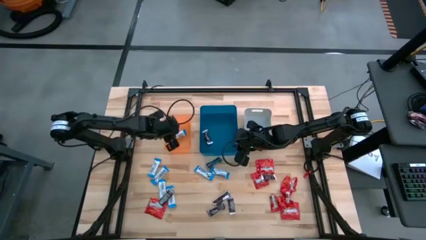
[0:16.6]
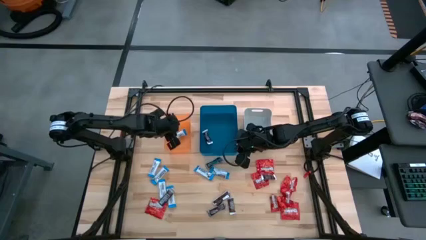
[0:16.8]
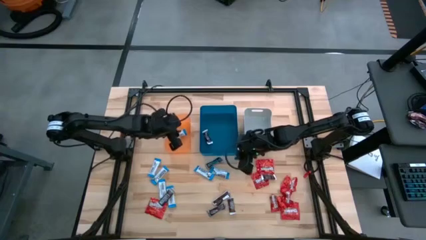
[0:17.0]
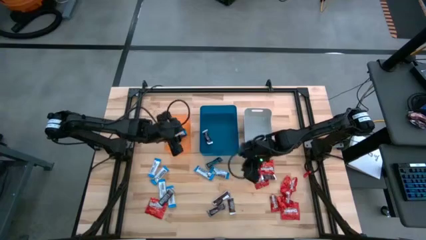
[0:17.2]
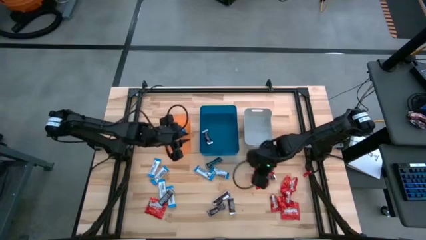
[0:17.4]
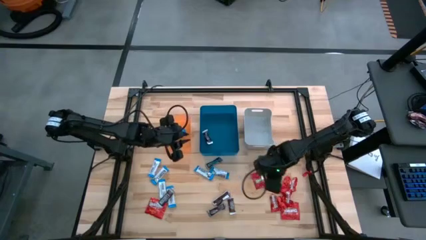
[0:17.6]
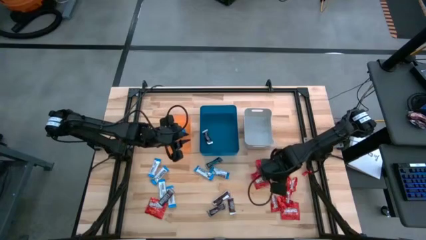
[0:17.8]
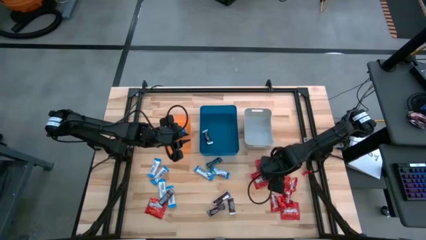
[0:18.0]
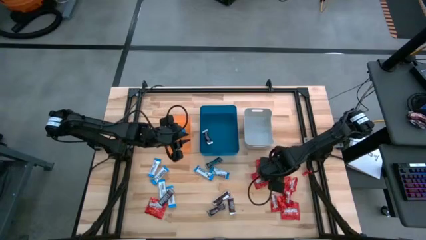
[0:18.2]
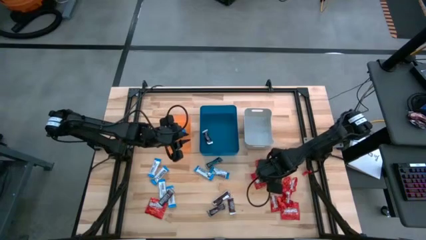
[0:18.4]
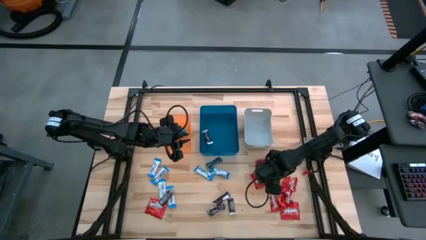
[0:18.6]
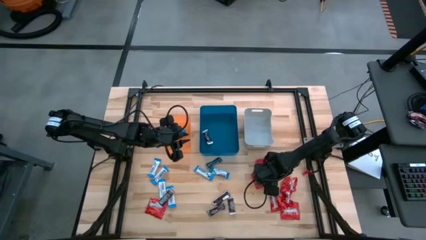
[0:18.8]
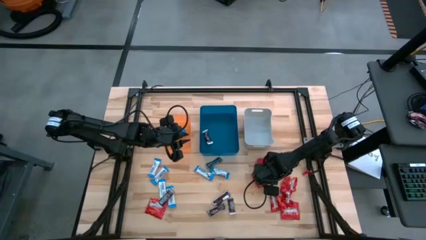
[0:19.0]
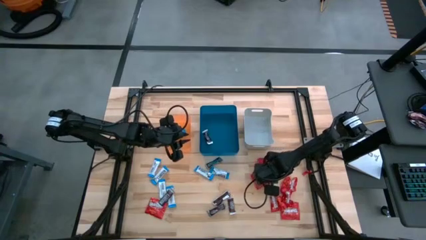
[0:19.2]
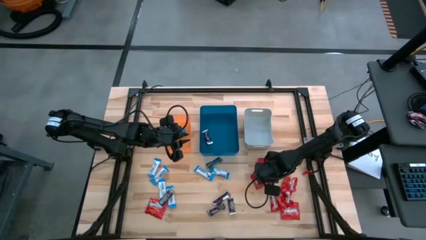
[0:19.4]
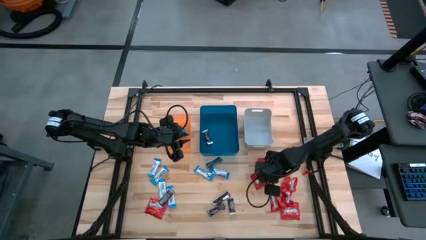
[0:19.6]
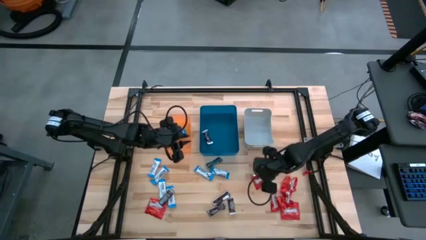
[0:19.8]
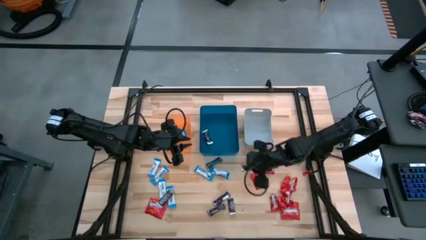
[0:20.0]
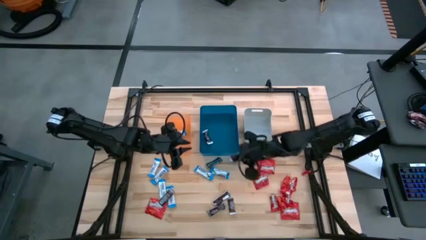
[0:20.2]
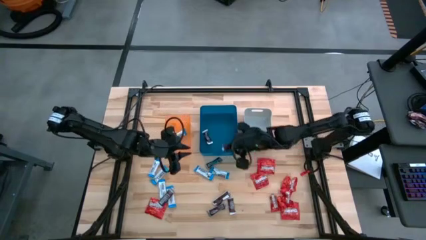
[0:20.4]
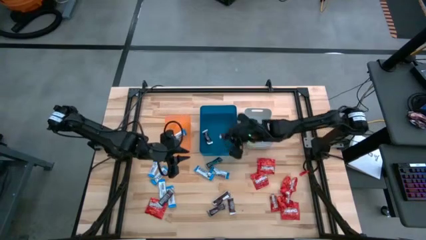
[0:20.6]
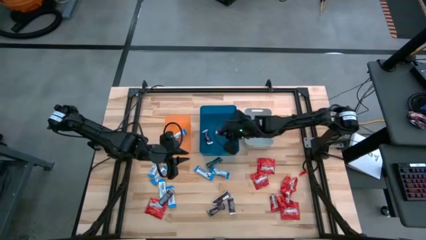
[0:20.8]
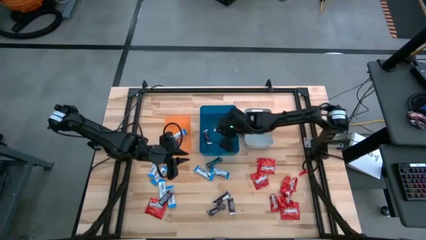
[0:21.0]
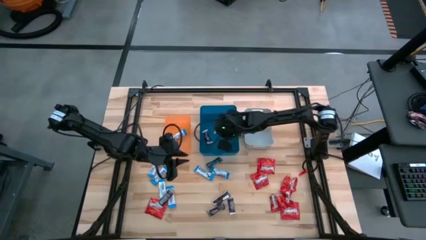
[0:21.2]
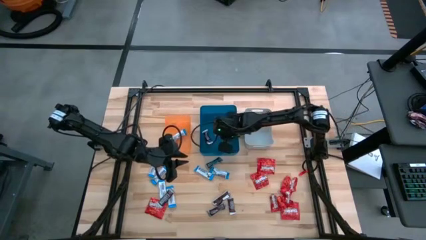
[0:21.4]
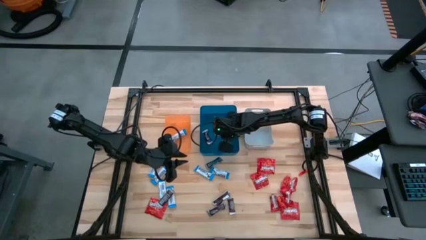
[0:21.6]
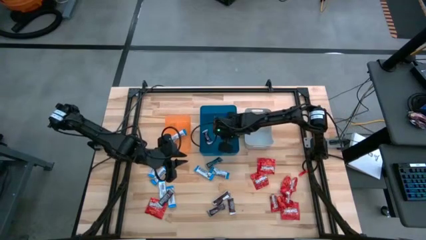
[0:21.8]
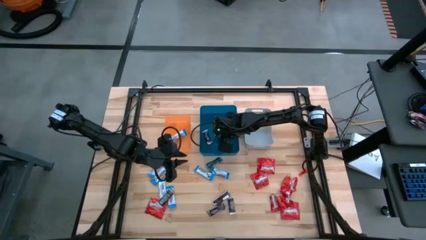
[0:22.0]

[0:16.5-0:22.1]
Task: Sort candy
Put the brown chocolate bar into the blue bin

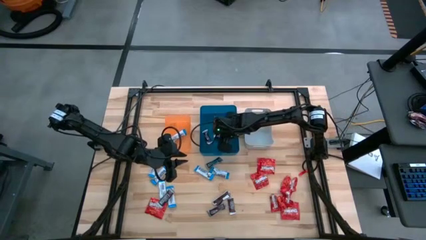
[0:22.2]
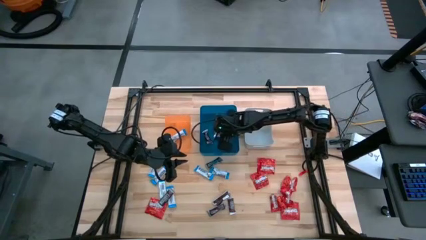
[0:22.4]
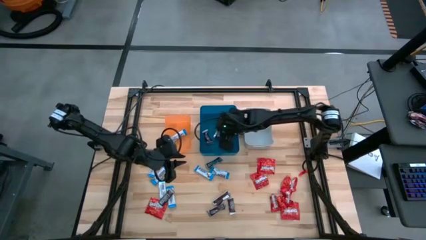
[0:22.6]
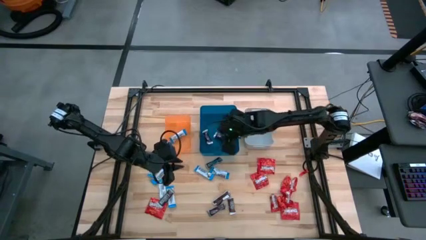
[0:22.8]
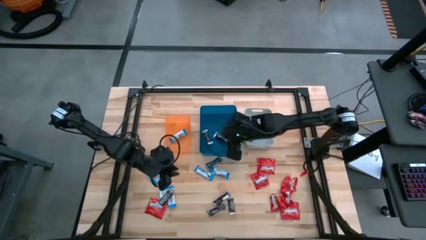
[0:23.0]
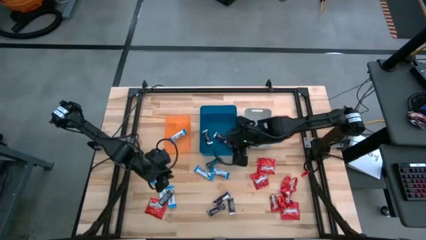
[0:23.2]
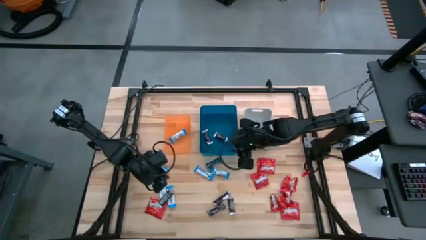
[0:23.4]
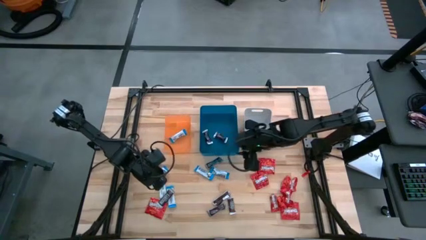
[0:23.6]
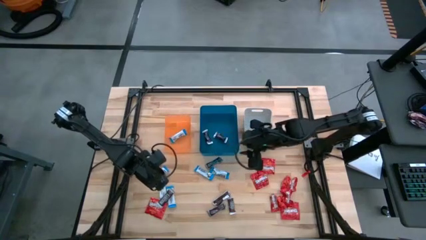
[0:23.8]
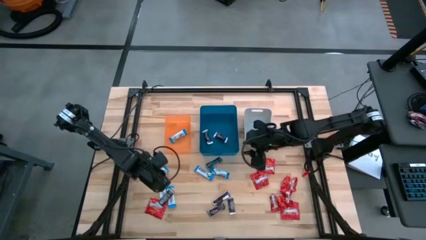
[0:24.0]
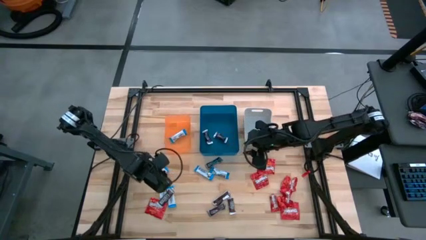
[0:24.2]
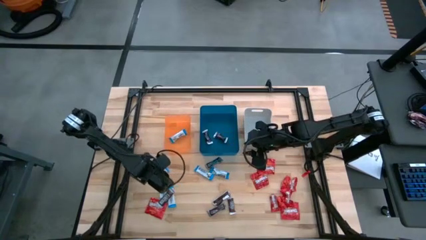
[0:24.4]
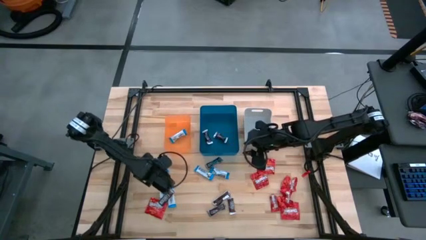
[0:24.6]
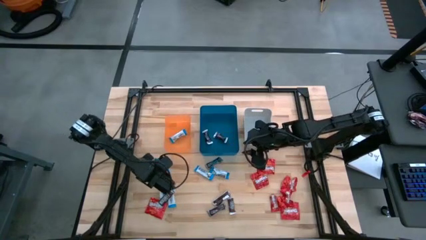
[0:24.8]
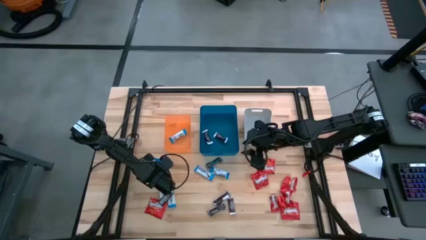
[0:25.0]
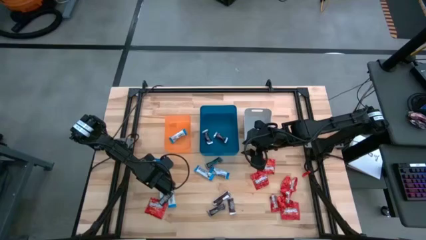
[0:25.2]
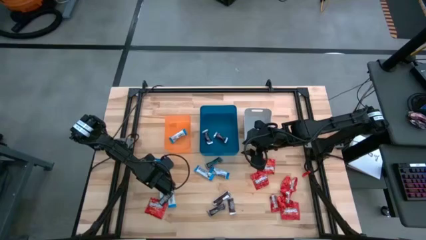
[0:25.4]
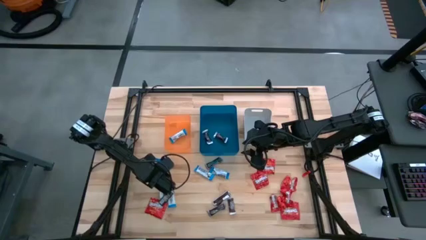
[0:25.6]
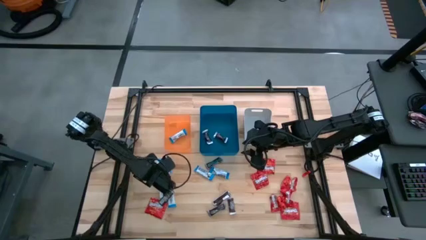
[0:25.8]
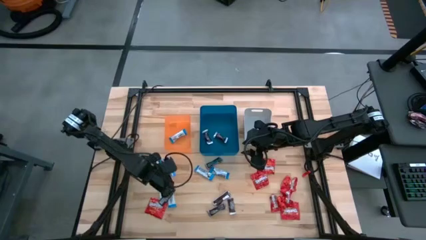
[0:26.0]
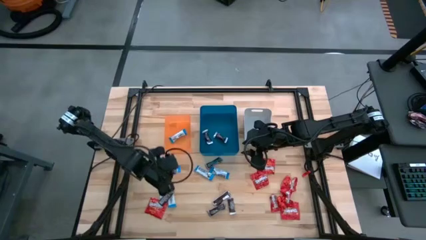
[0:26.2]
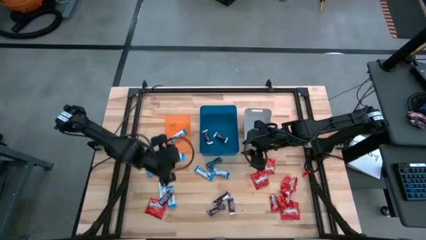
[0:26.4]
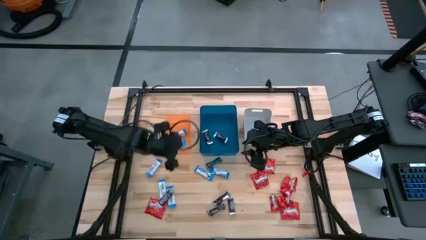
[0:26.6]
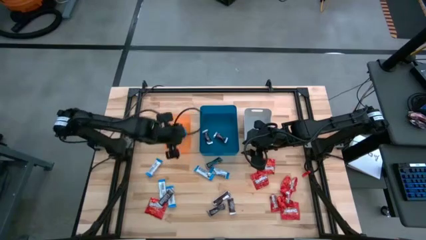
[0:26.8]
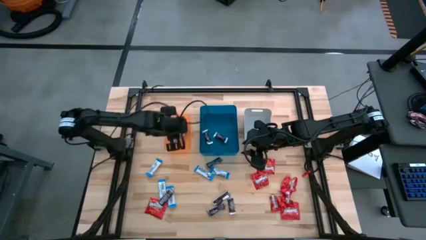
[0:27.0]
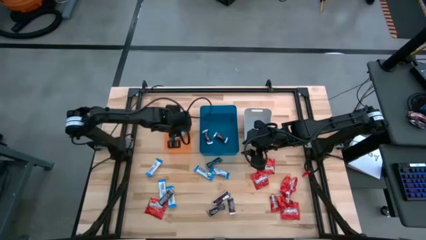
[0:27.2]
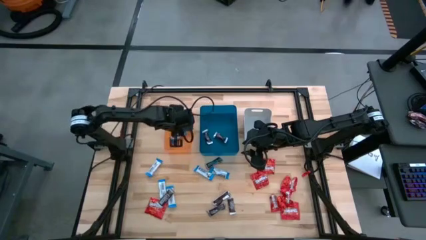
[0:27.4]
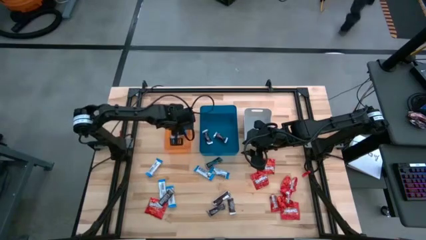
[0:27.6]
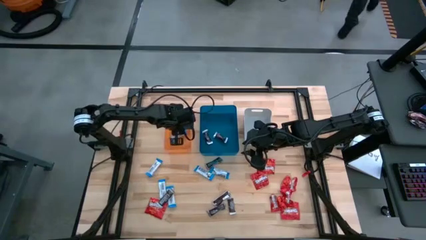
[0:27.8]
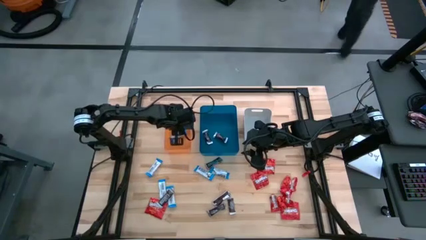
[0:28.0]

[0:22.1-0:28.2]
Put the white chocolate bar into the orange bin

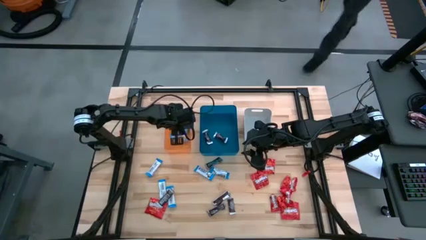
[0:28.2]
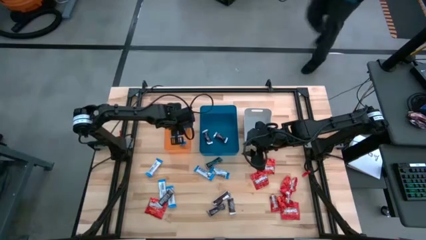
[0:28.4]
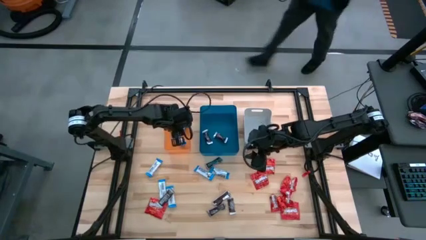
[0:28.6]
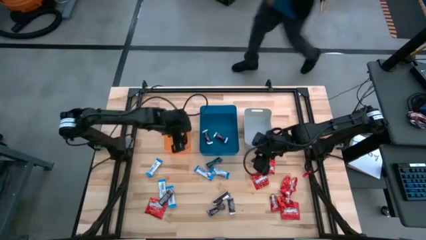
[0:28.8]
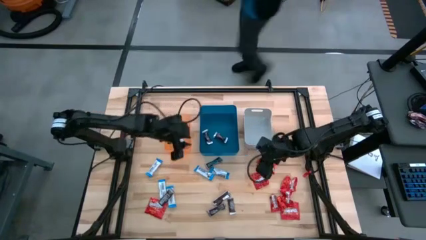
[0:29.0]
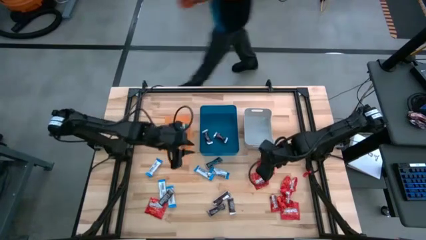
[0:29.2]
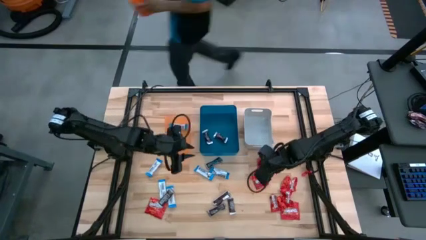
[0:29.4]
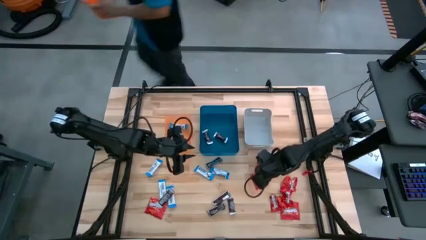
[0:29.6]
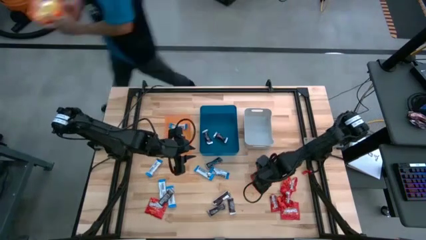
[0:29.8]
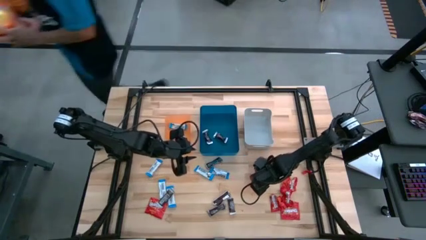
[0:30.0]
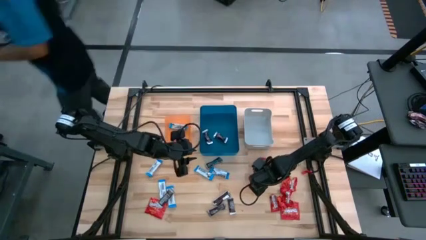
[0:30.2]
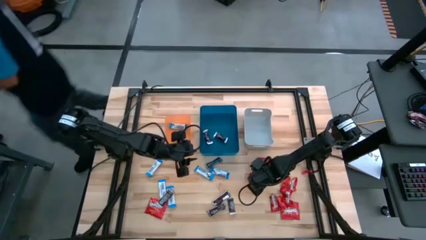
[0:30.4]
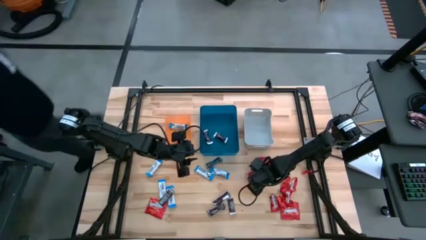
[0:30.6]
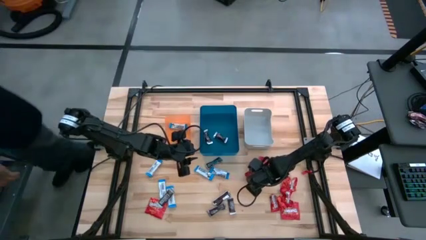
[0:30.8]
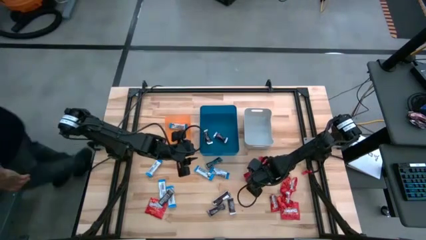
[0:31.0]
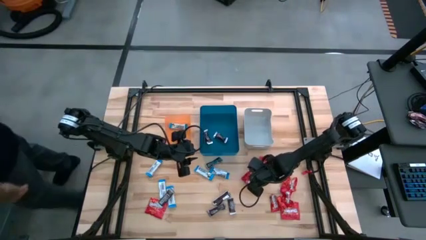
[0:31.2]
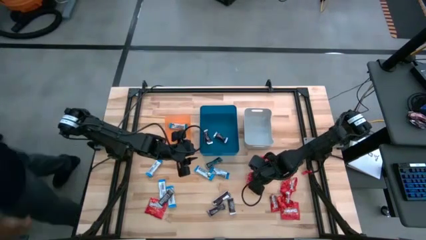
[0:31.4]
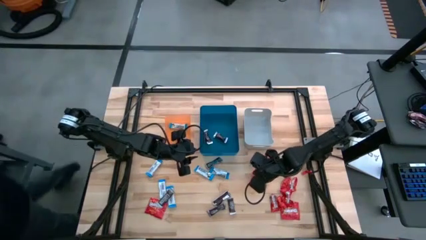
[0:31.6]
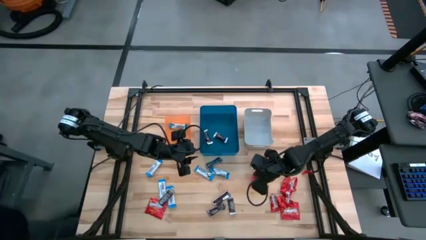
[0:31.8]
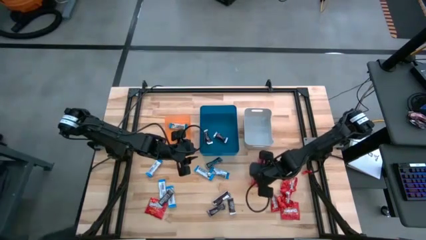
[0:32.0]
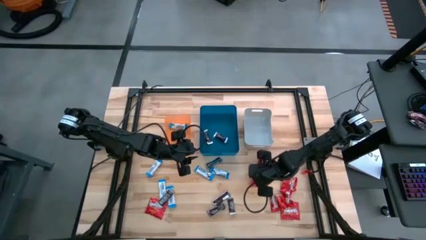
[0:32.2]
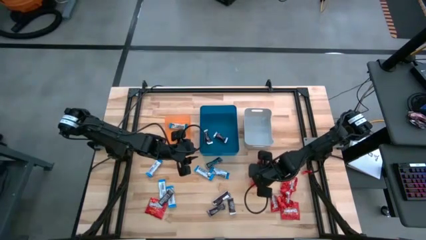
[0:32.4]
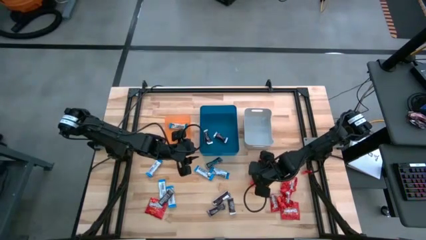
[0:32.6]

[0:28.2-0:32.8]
Put the red candy into the gray bin

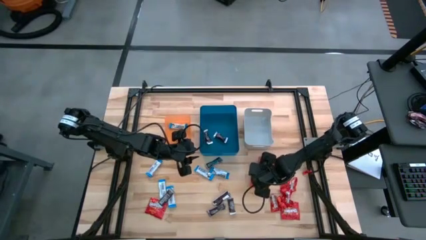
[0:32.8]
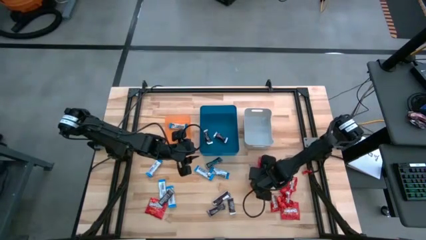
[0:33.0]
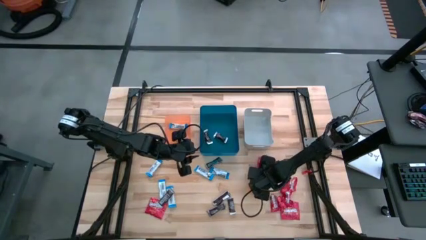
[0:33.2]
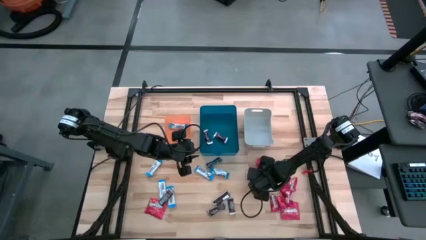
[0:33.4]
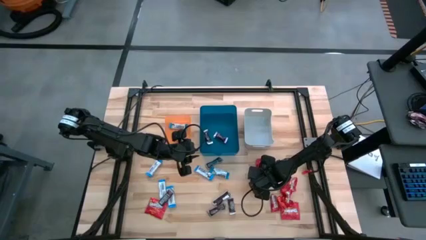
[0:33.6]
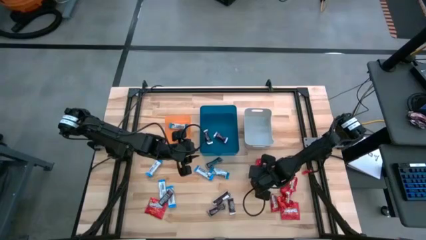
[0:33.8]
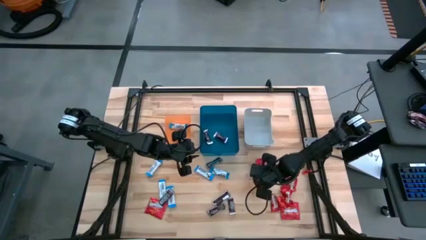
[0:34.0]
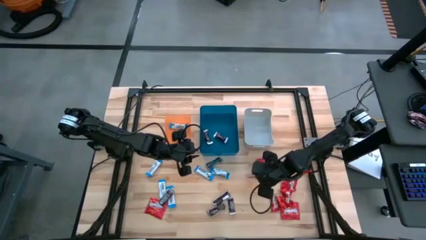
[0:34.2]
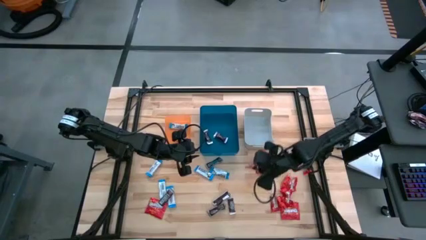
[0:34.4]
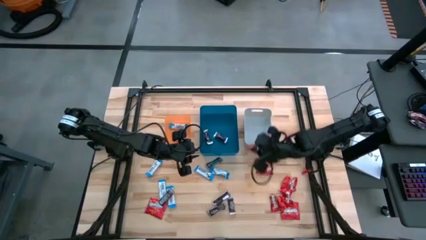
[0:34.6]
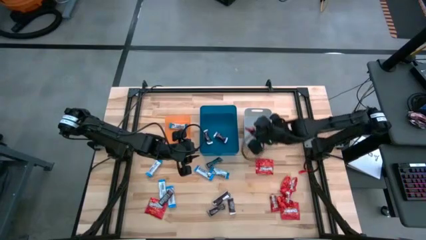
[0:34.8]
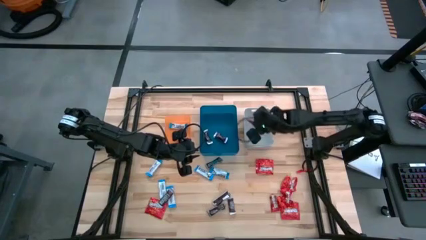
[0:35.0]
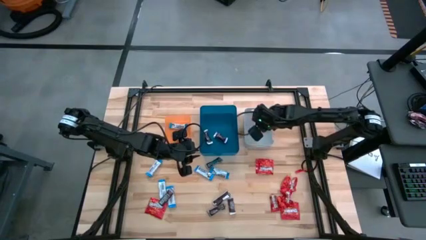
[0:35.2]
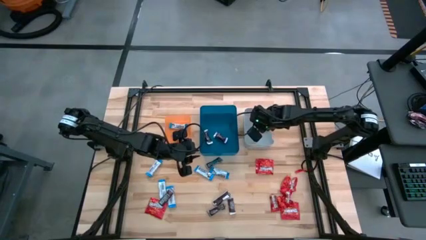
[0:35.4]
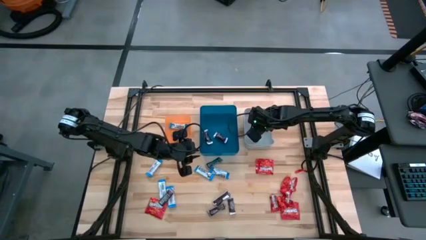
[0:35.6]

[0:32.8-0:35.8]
Put the red candy into the gray bin
